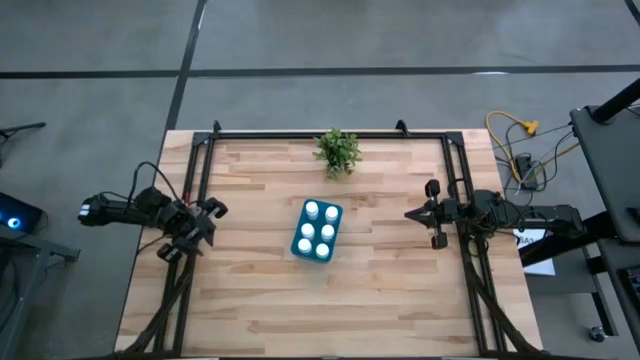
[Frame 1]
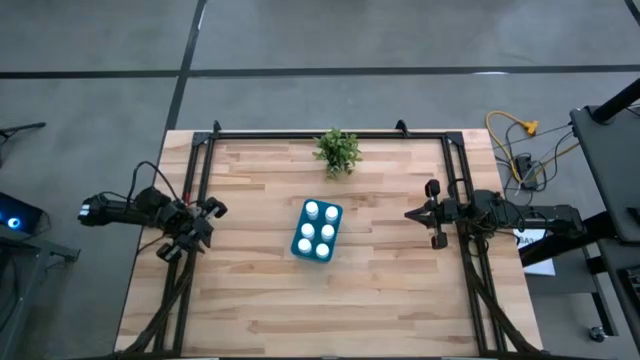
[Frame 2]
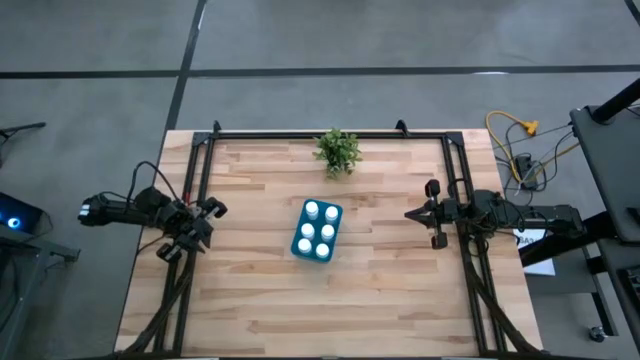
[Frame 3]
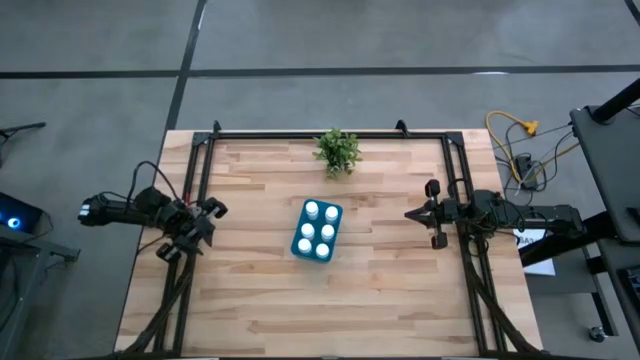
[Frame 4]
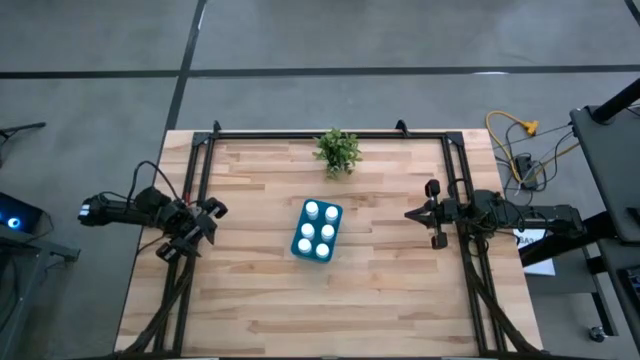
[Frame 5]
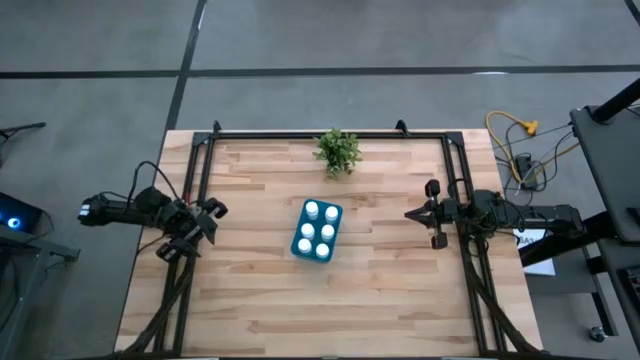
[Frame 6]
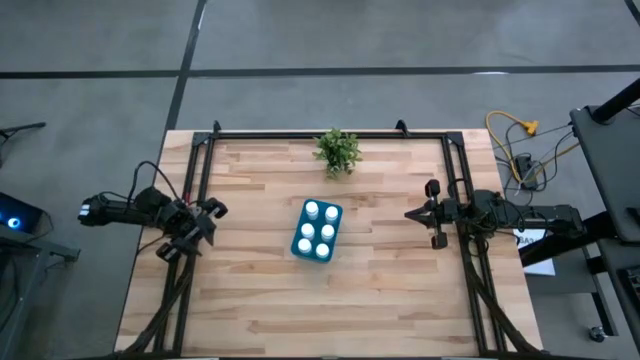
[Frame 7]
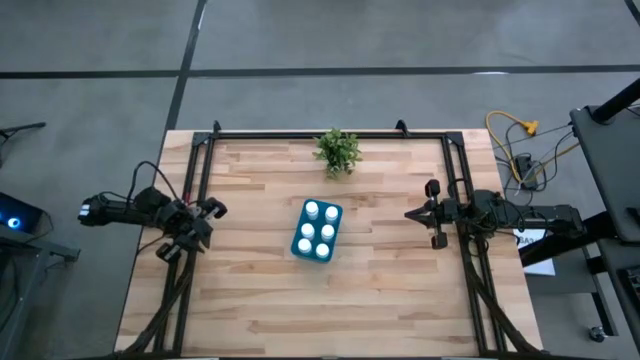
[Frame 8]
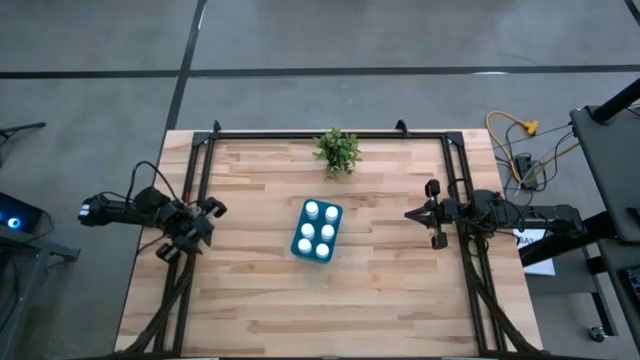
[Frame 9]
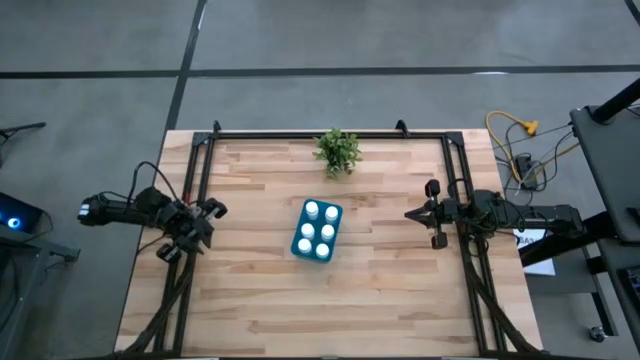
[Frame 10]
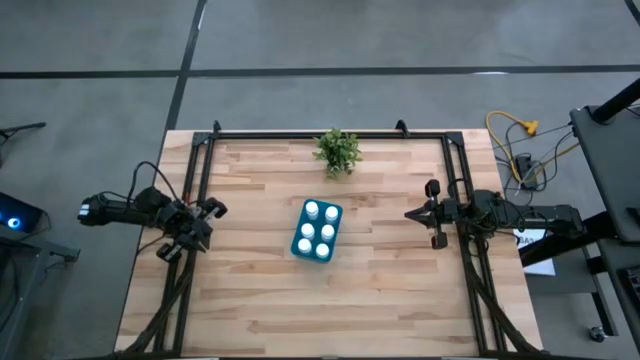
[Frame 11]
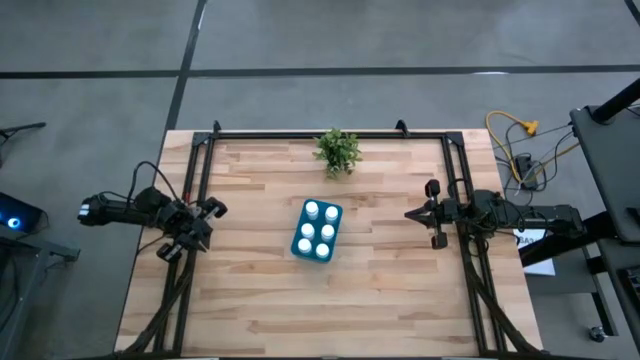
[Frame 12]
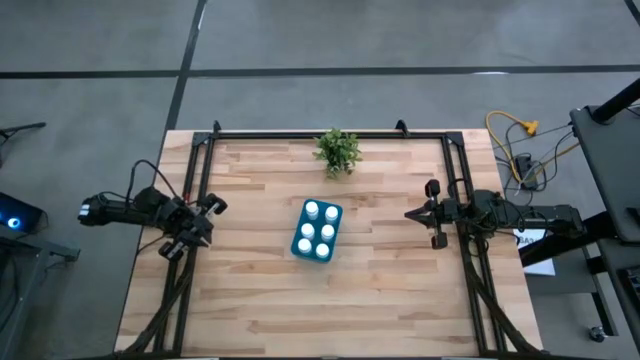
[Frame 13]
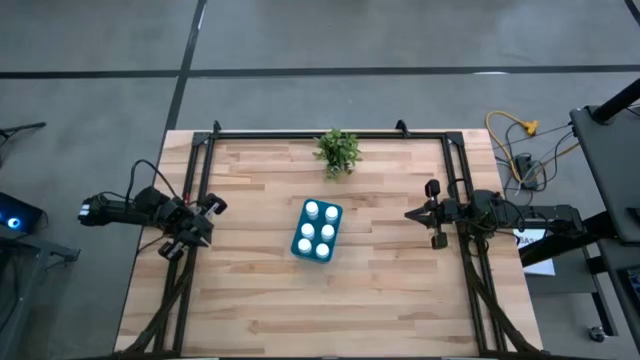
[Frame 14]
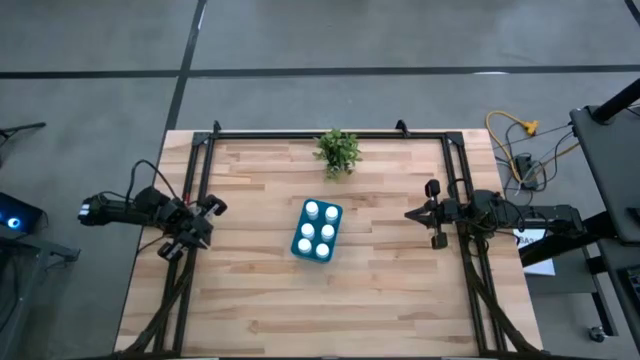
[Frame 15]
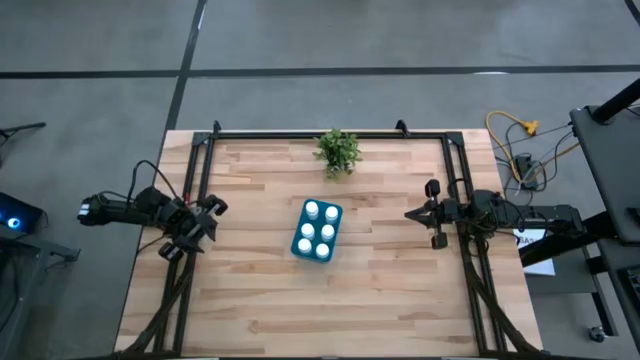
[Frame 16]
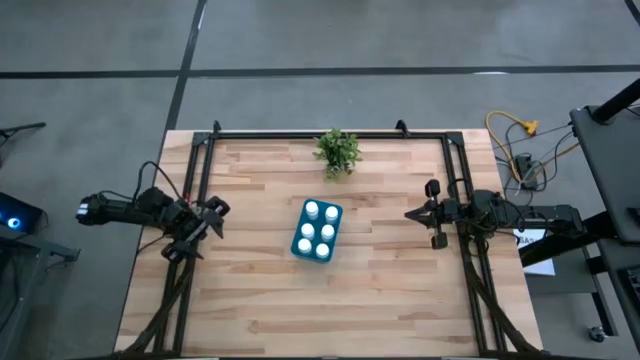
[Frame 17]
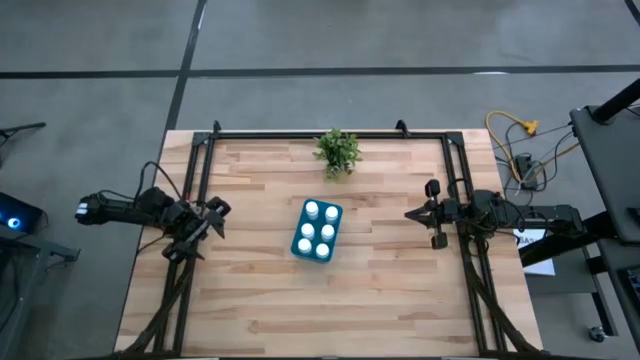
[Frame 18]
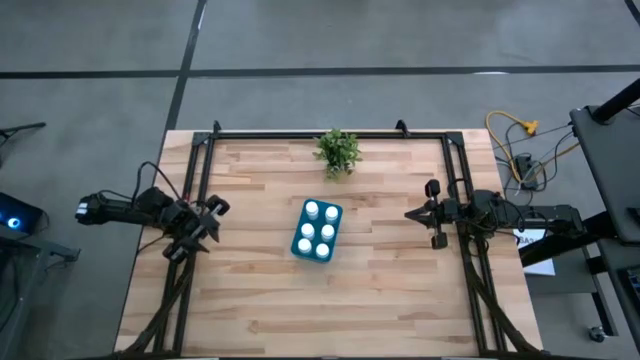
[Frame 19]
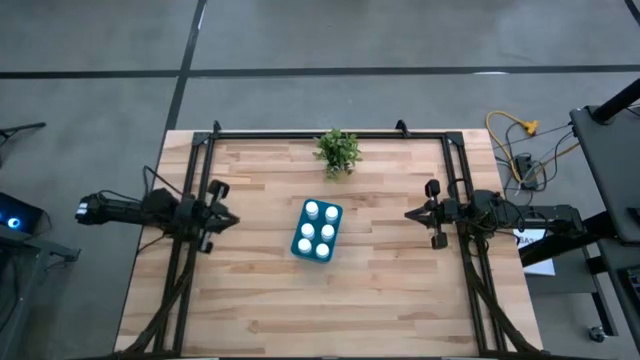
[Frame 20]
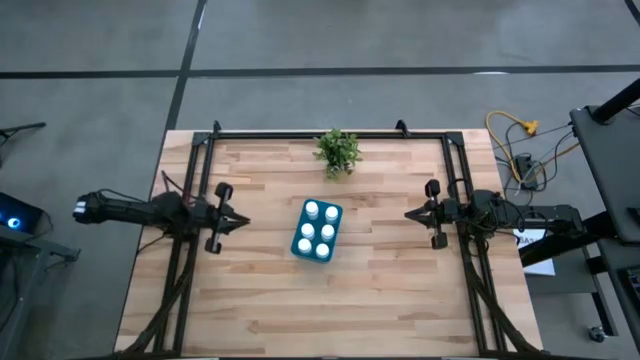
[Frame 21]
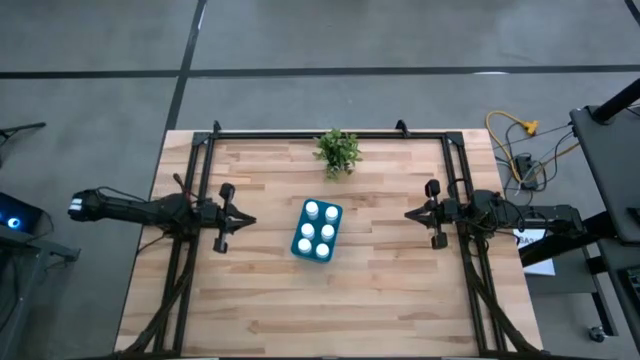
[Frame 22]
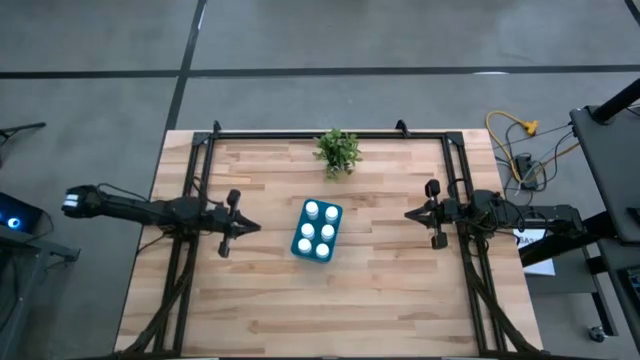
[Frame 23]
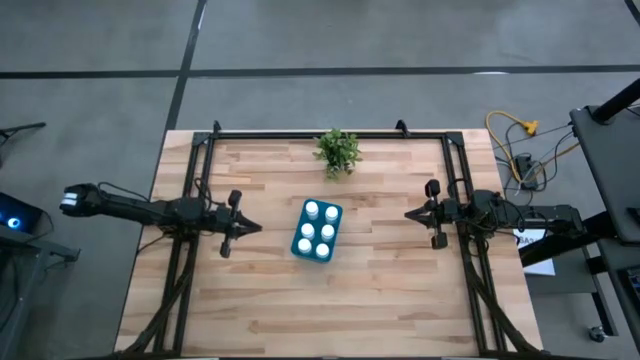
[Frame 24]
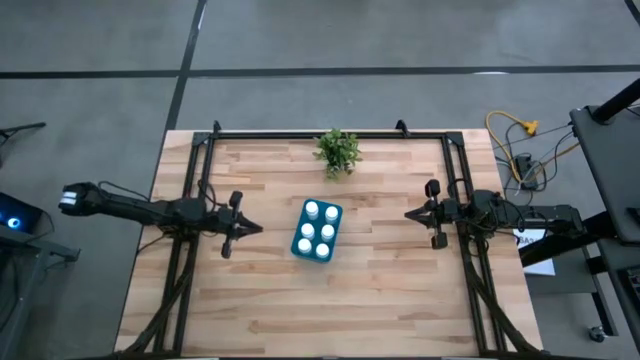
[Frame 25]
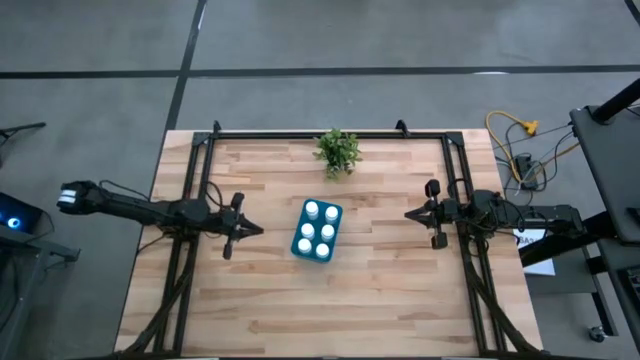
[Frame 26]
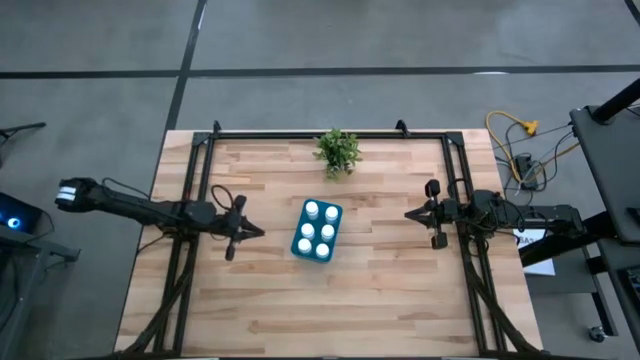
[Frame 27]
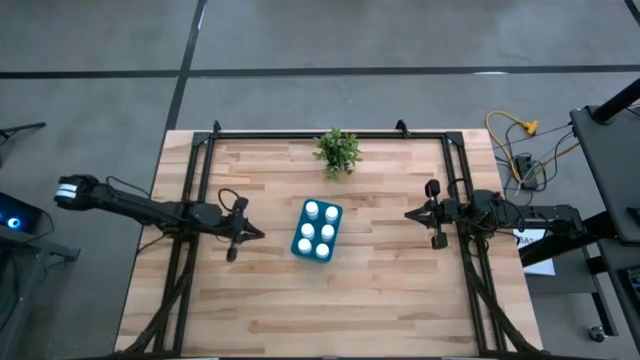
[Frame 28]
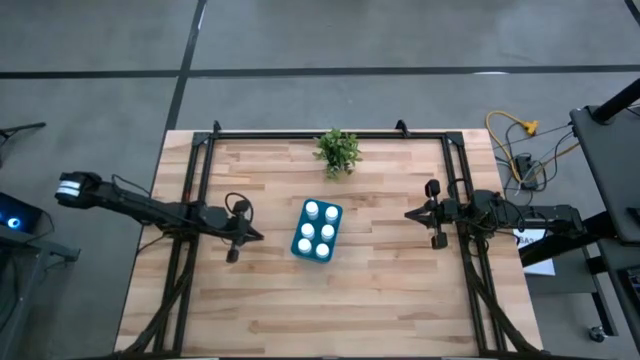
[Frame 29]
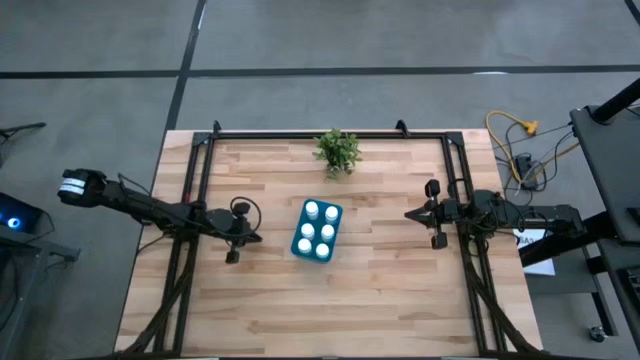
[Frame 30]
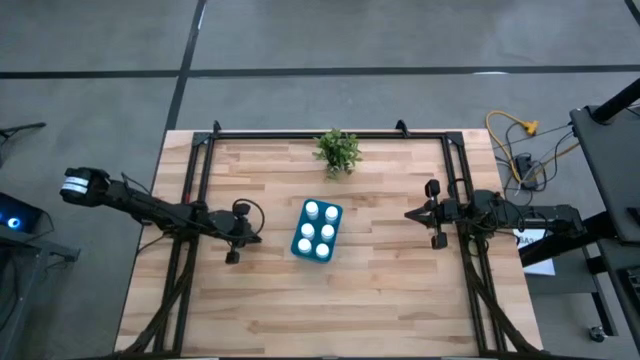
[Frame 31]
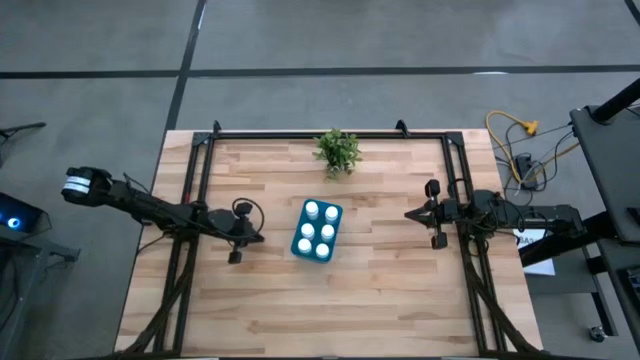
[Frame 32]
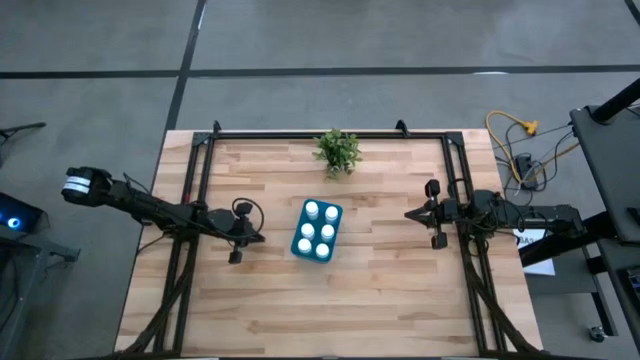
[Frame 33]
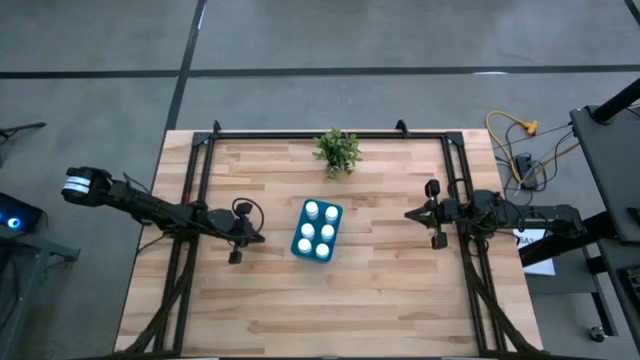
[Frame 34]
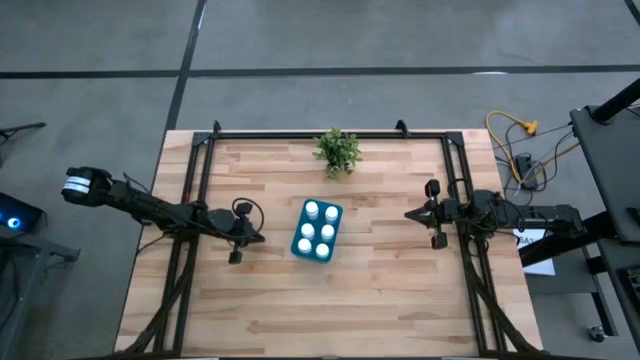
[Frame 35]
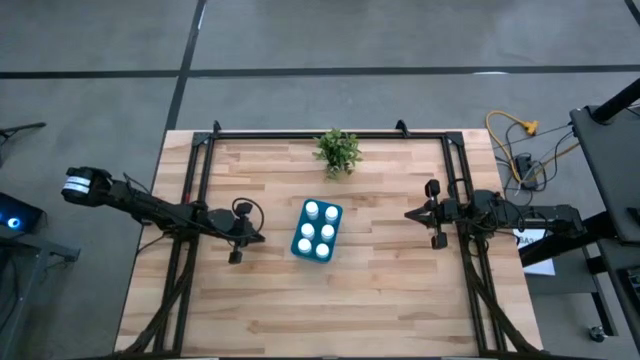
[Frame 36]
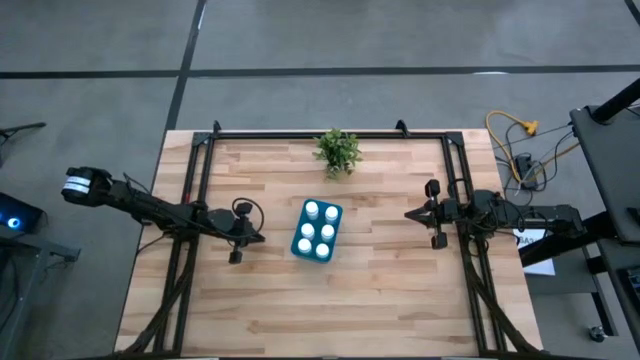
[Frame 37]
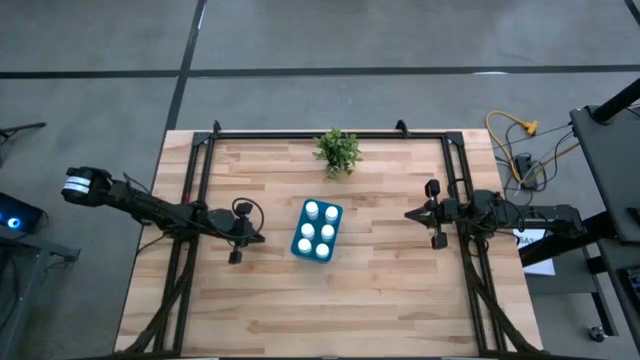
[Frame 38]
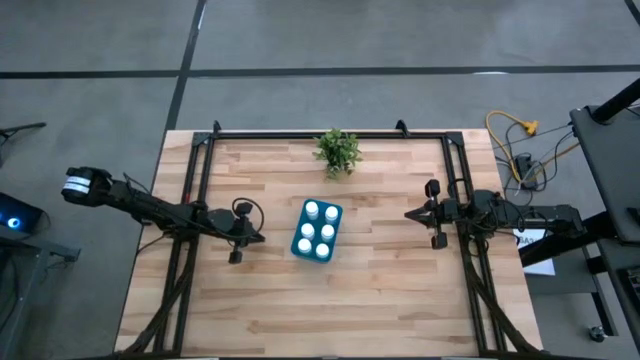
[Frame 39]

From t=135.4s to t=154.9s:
Task: Pick and place pill bottles into a basket
Return to Home Position
